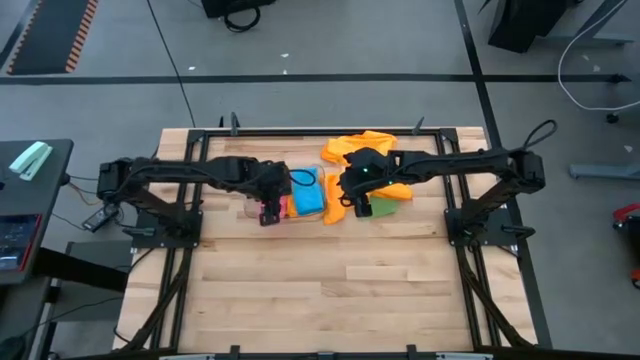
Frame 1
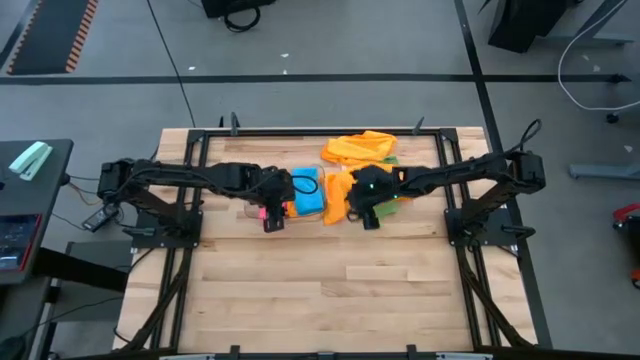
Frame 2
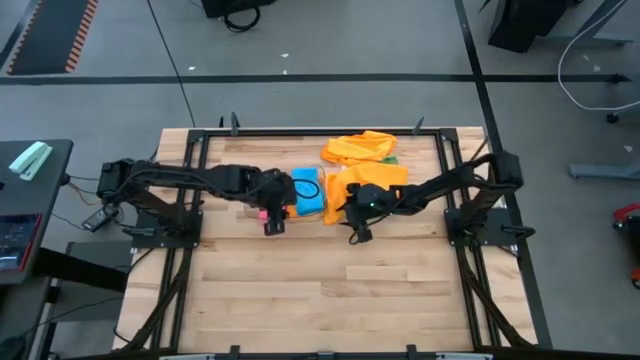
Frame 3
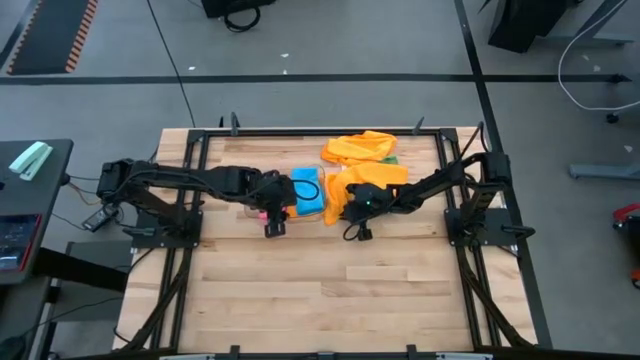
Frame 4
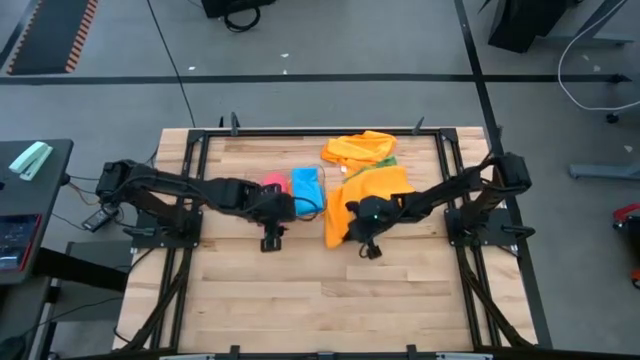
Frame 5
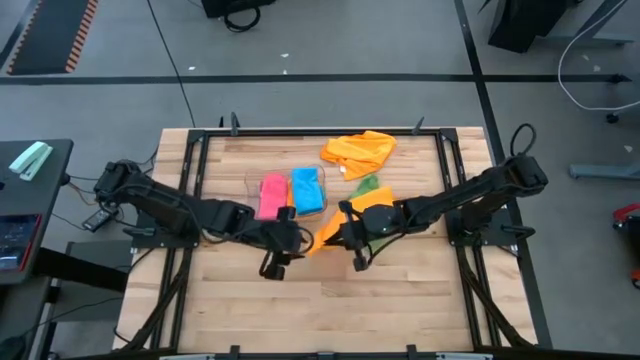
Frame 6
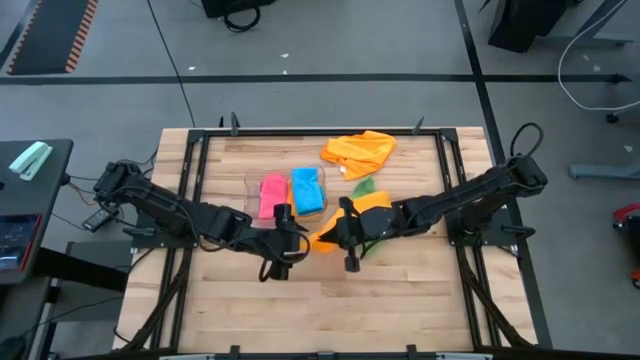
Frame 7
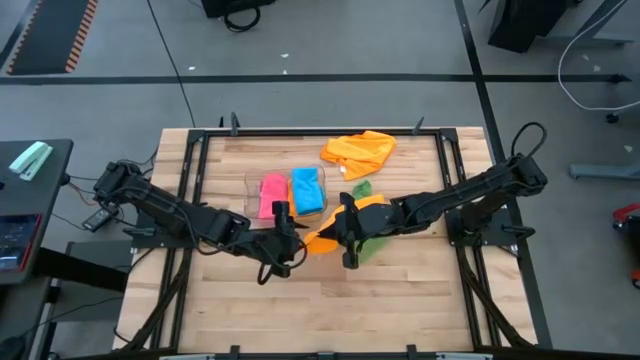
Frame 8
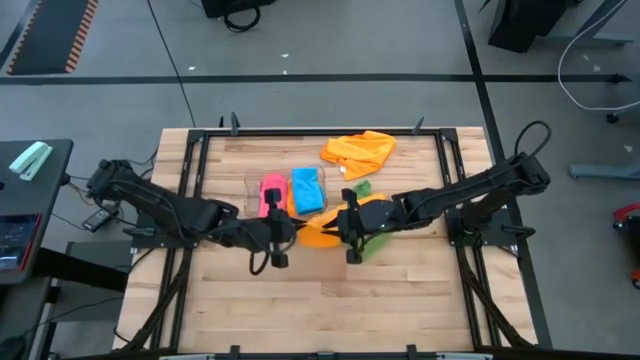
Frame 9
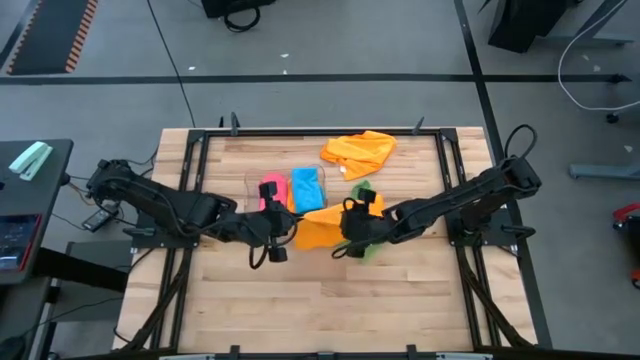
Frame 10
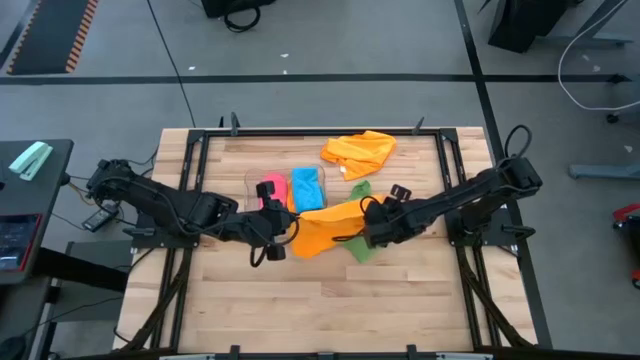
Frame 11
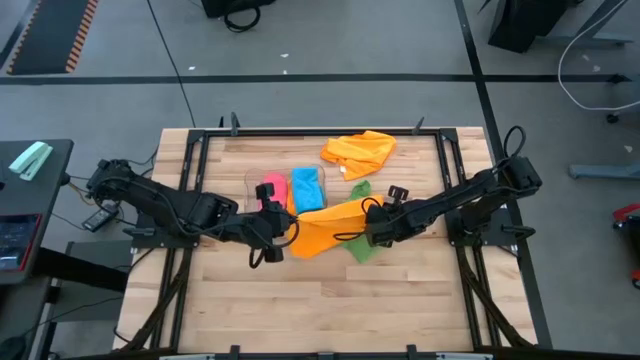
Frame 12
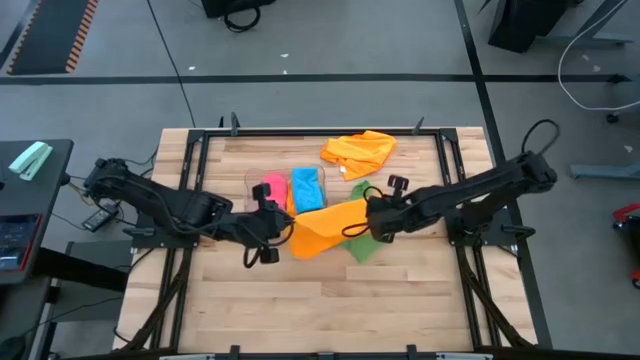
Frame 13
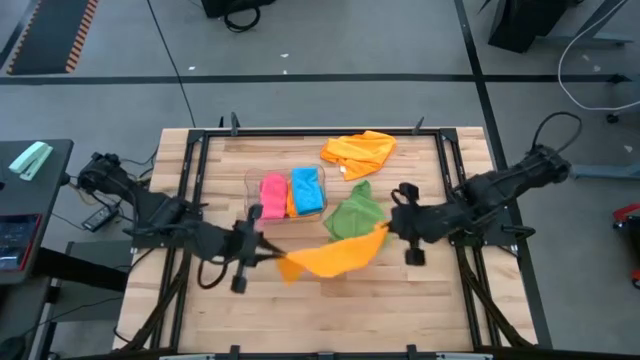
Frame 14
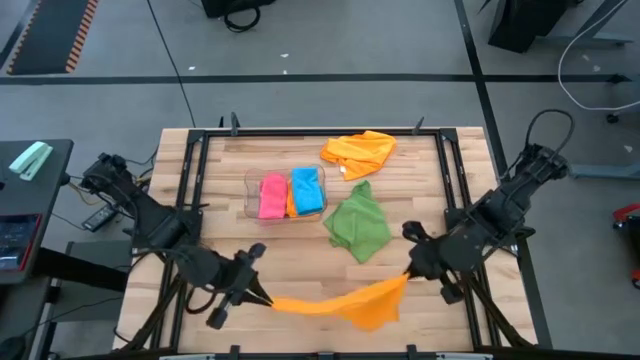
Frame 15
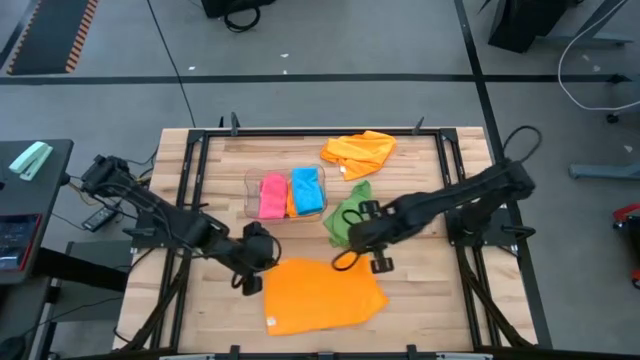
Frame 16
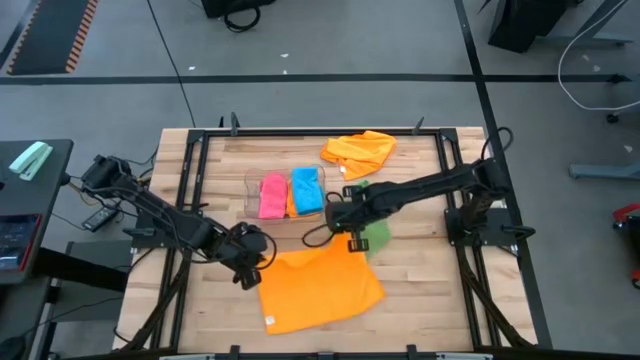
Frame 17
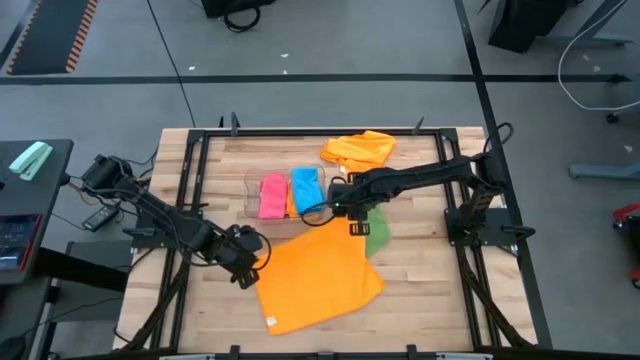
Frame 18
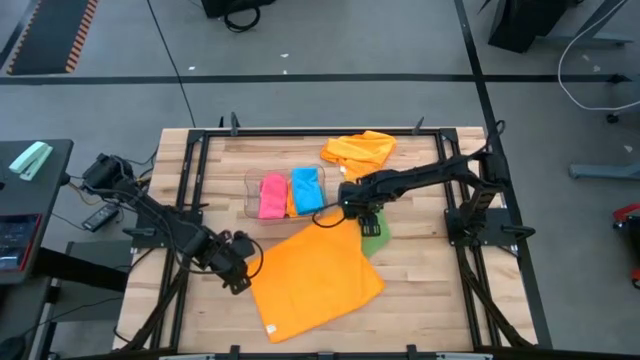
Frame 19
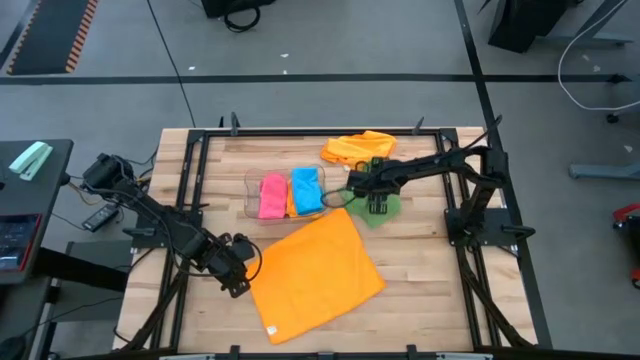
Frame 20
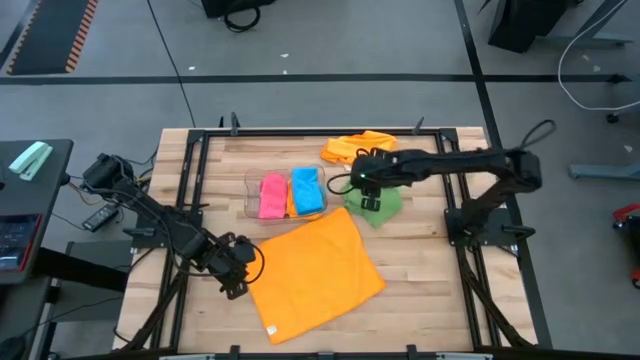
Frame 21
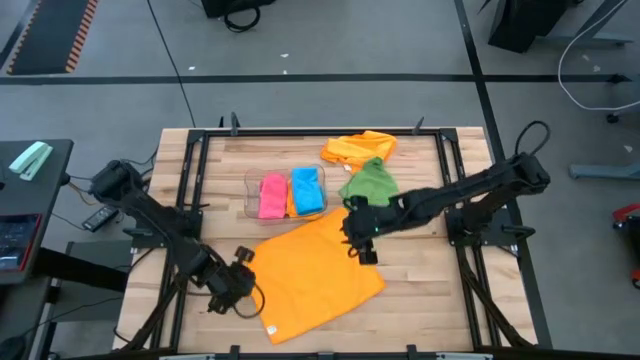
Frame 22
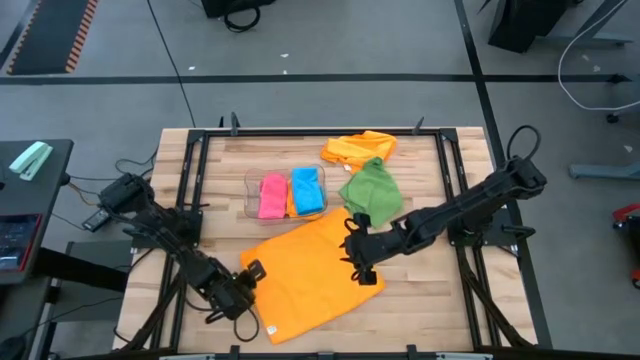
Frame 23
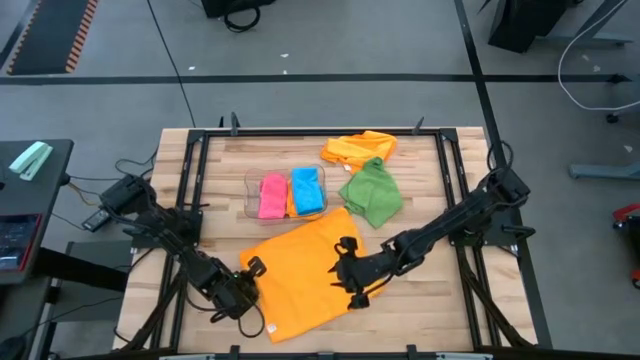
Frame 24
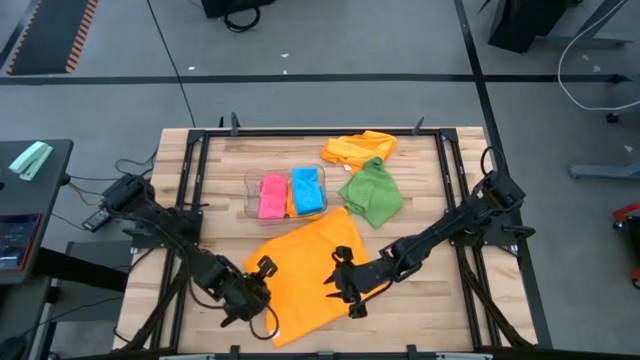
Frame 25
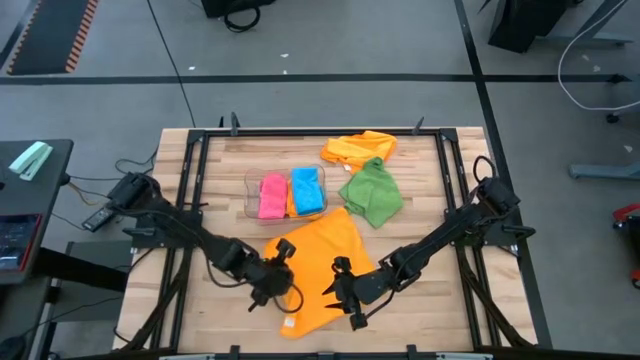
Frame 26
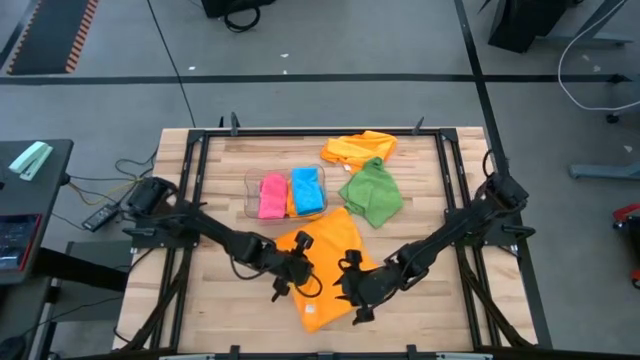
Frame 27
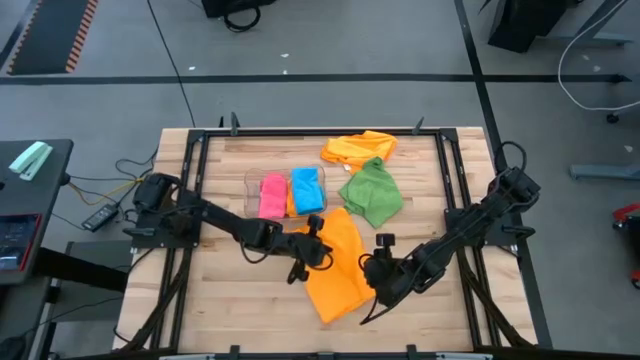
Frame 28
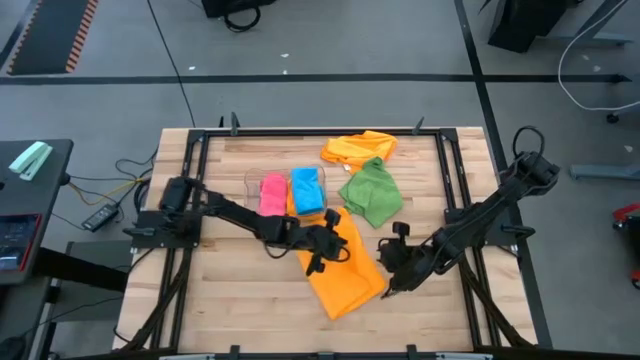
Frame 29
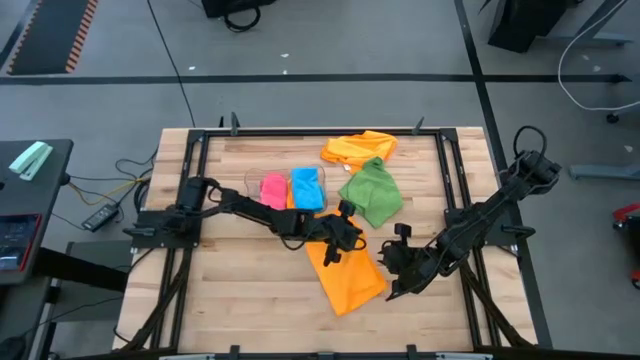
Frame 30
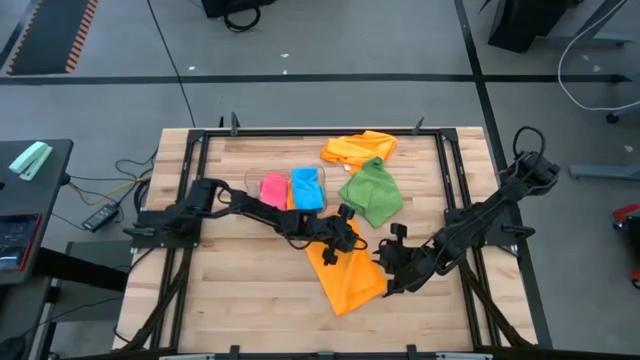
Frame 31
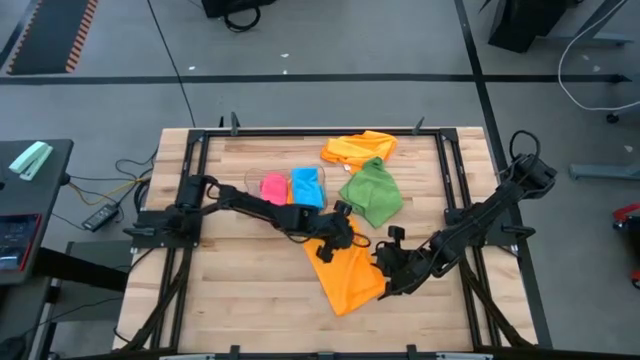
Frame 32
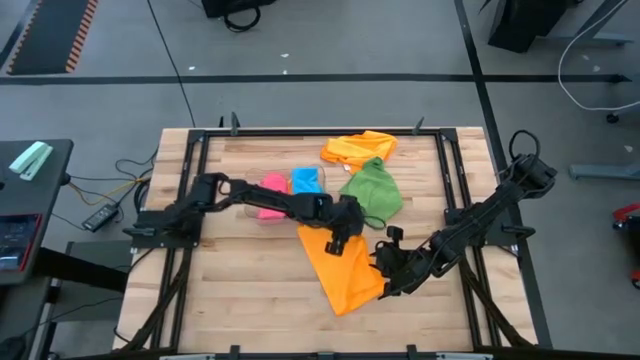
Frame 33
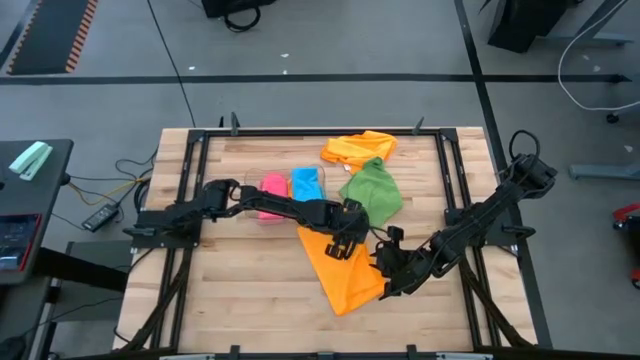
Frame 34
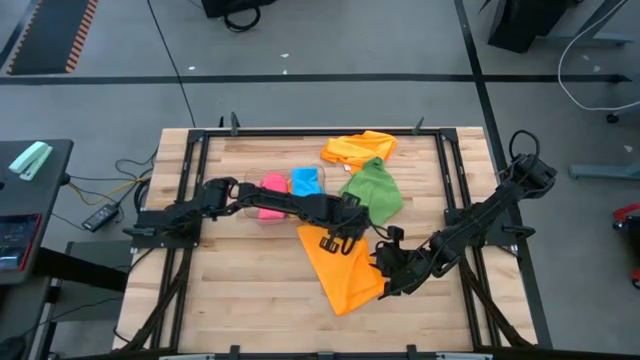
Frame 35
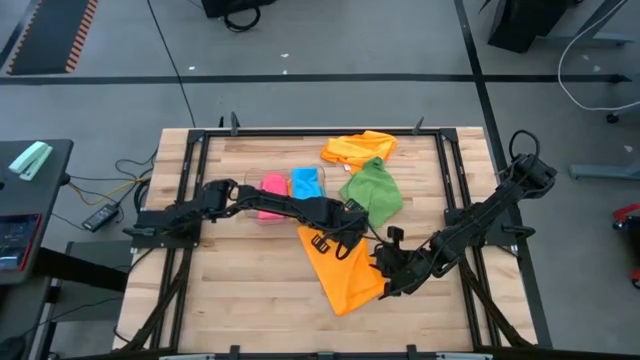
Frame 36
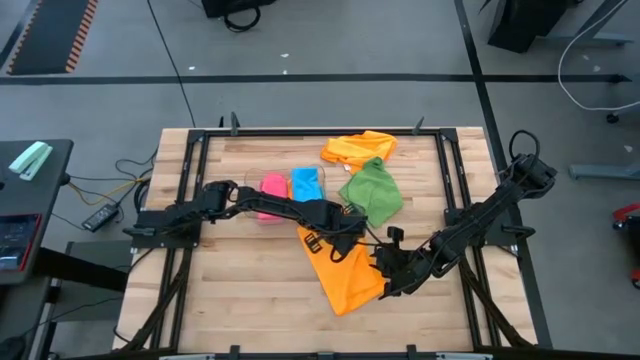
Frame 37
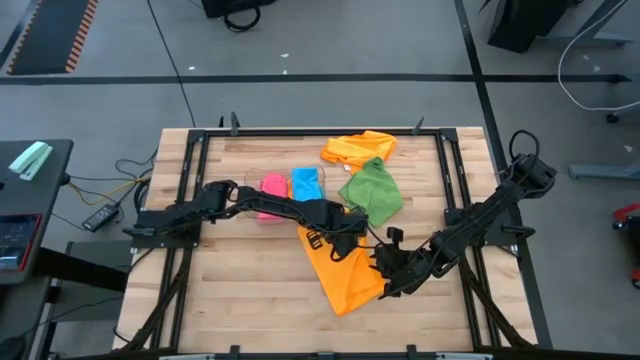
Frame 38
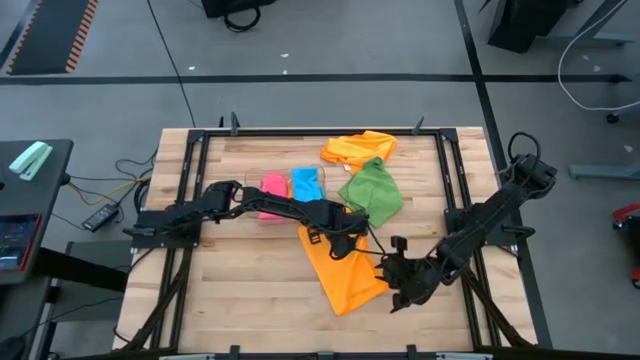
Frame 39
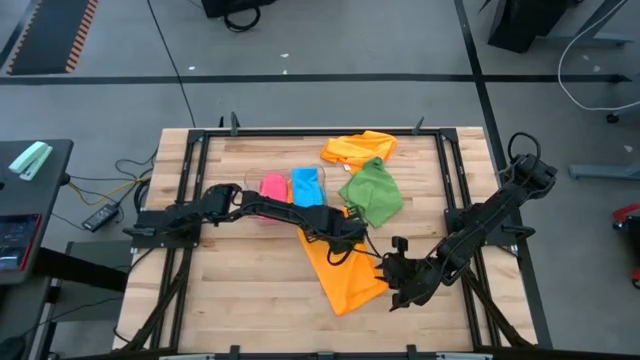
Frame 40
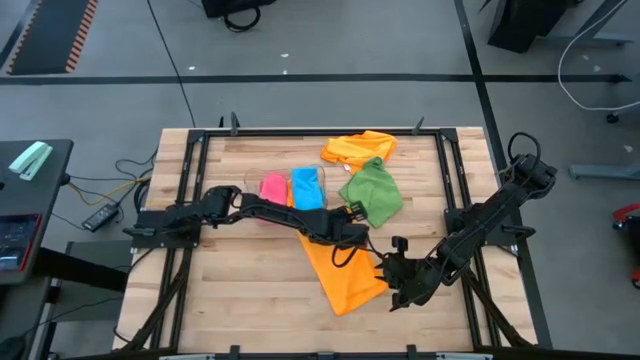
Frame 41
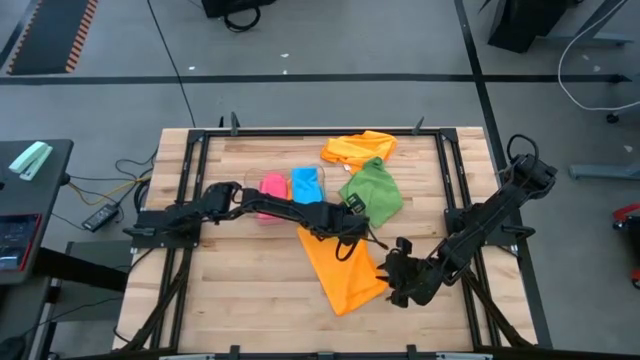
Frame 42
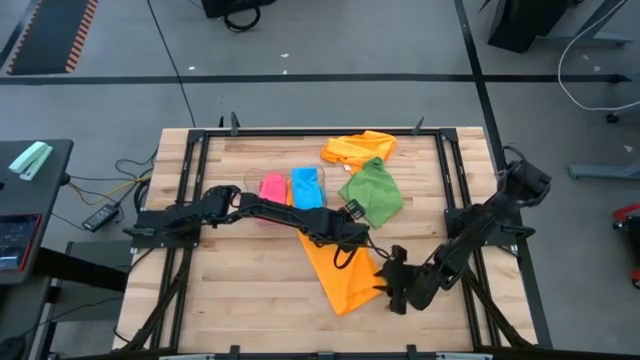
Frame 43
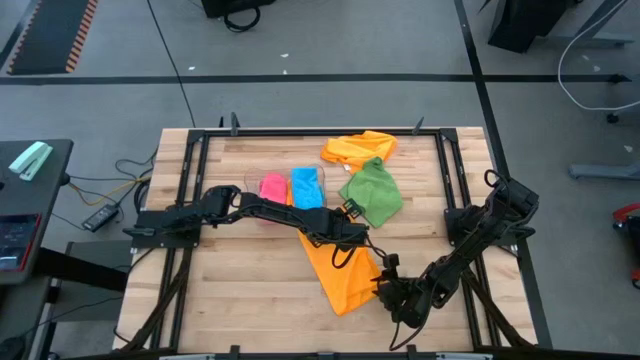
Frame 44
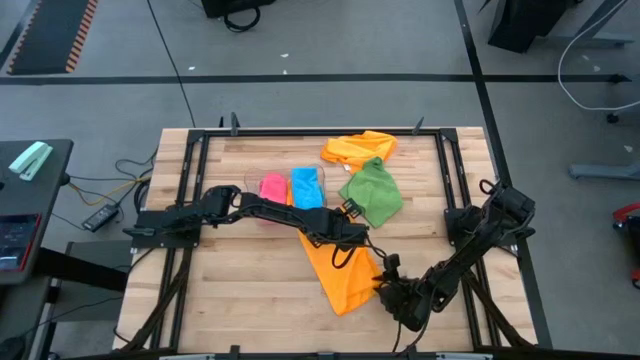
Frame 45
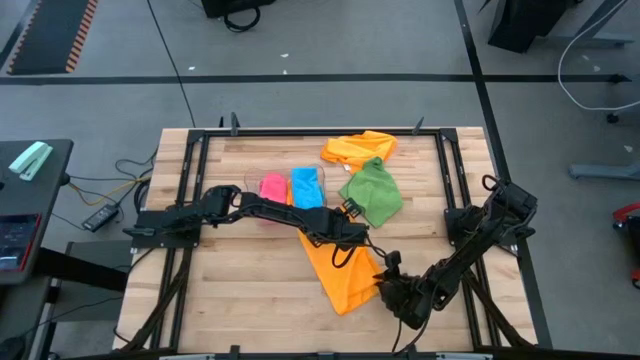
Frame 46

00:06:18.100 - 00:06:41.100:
Task: Fold microfiber towels
Fold the bottom orange microfiber cloth
